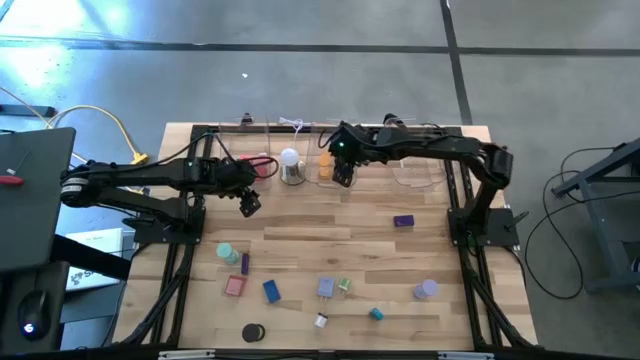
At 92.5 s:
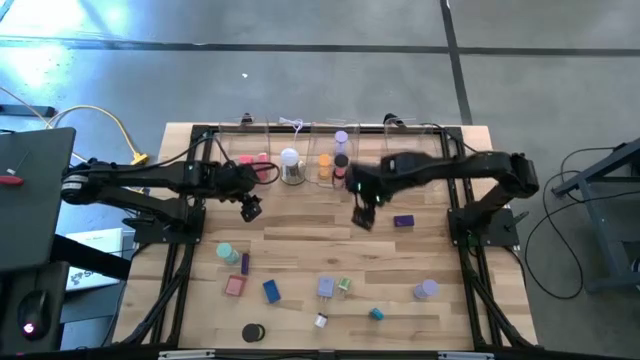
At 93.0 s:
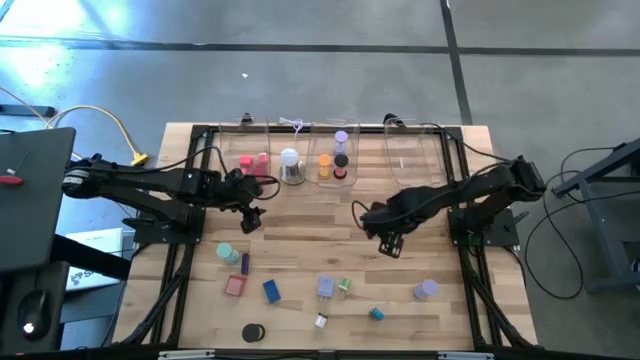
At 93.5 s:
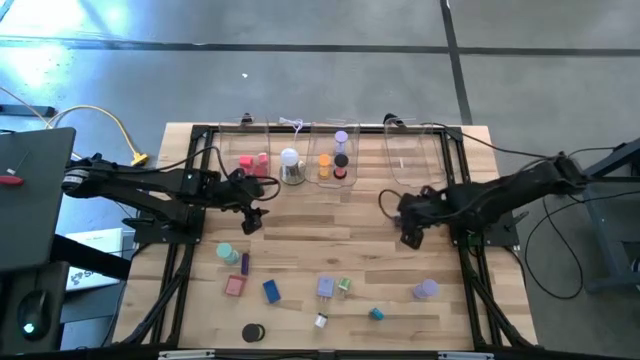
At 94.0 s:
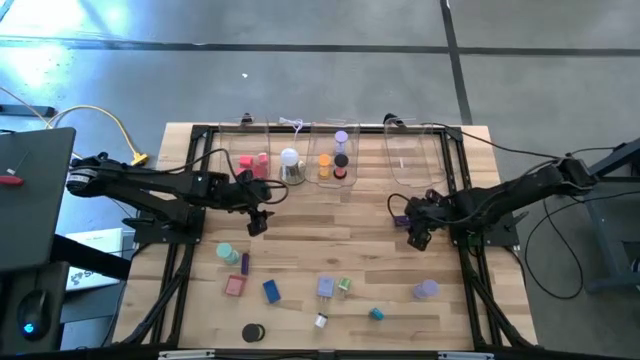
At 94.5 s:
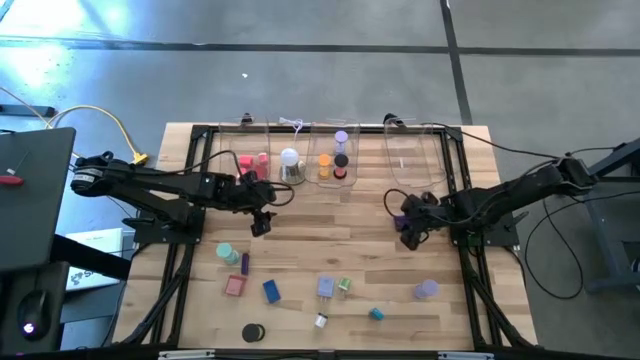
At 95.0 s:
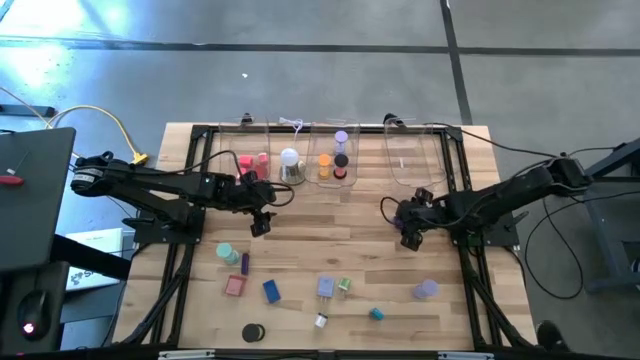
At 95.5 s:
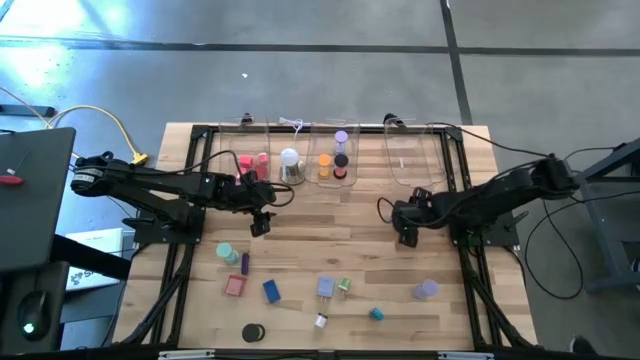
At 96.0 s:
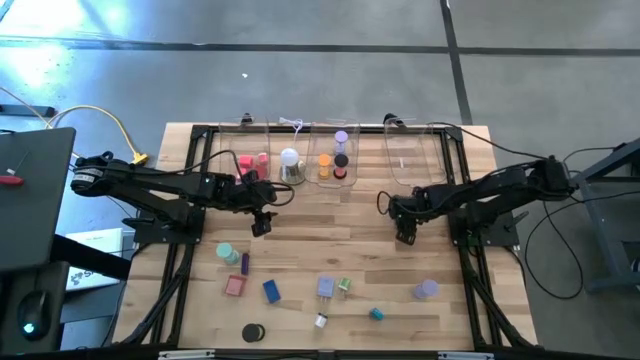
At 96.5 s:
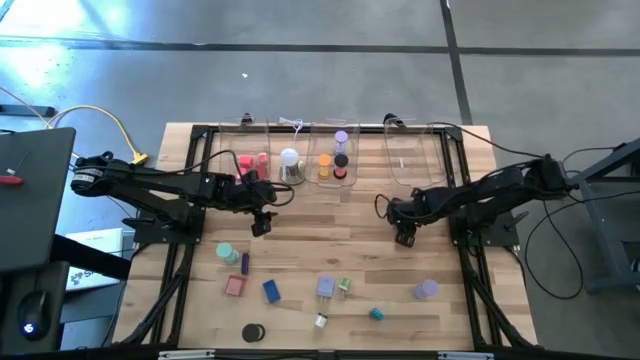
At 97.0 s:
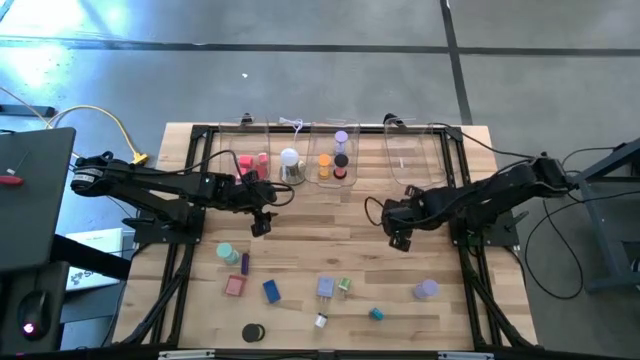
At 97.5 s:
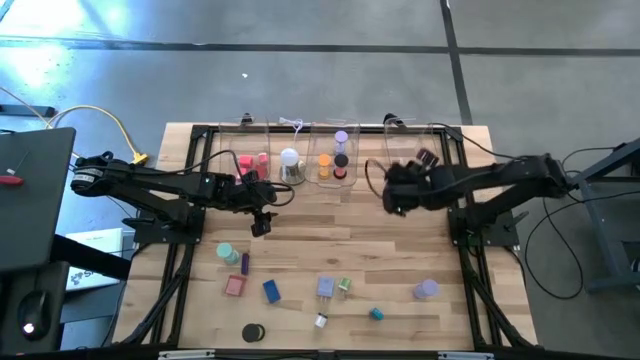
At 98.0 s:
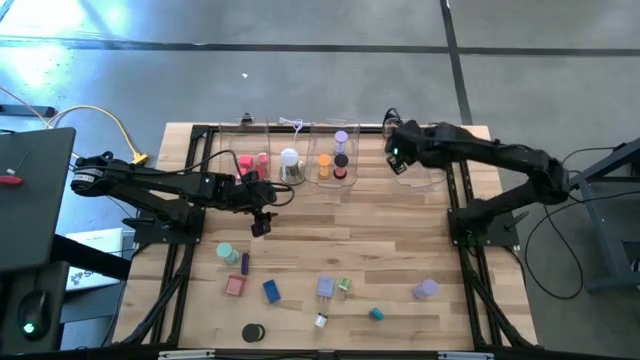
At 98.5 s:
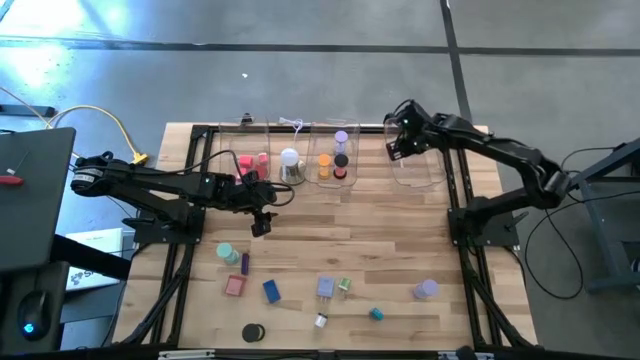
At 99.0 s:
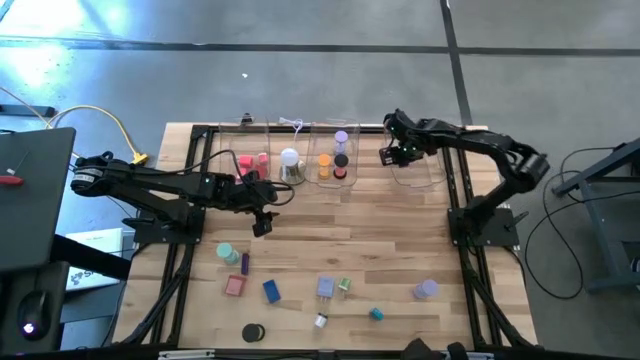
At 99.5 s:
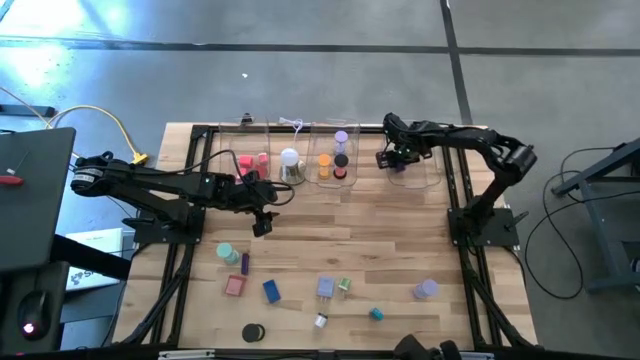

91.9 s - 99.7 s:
Task: Pick & Place Office items
Put the right blue digital clock into the right transparent bin

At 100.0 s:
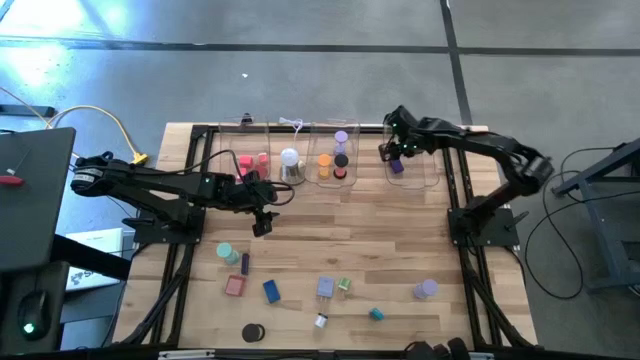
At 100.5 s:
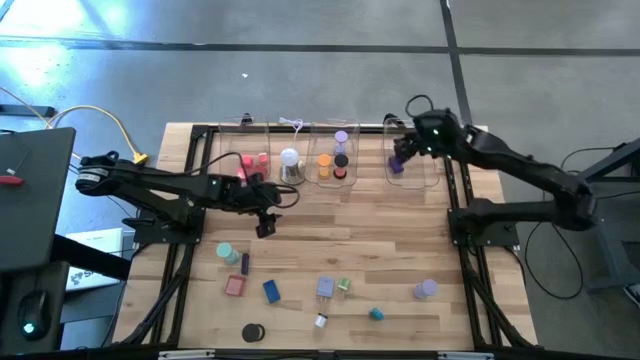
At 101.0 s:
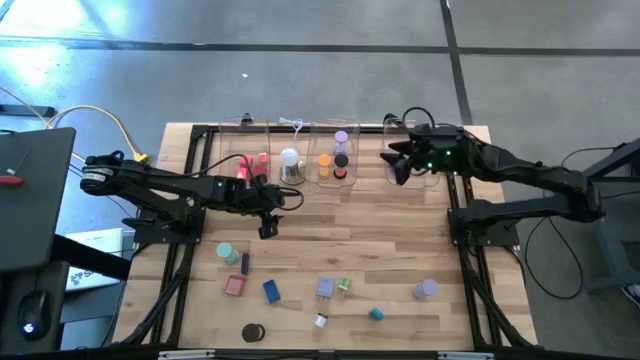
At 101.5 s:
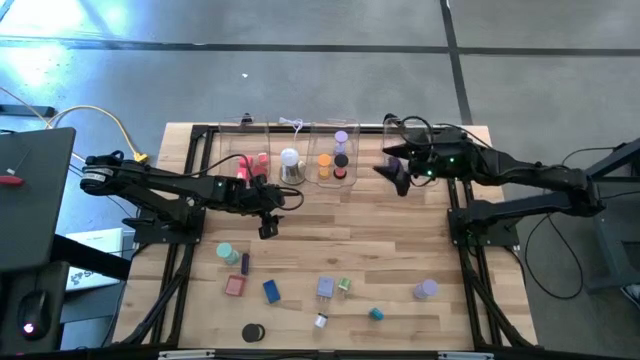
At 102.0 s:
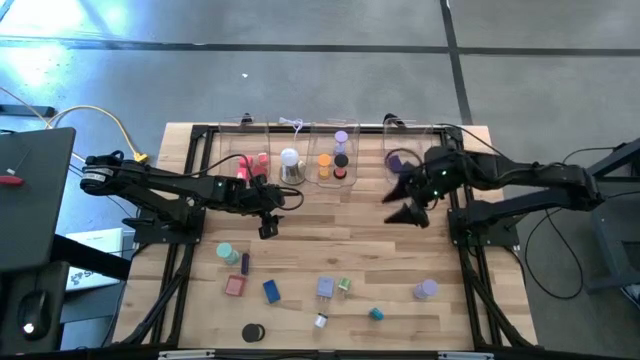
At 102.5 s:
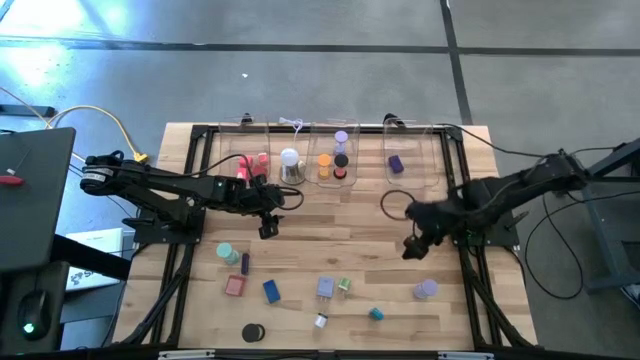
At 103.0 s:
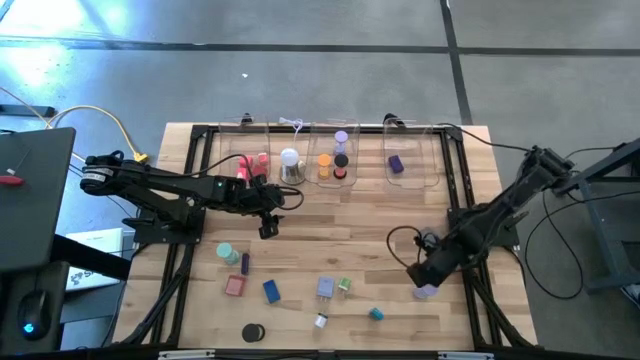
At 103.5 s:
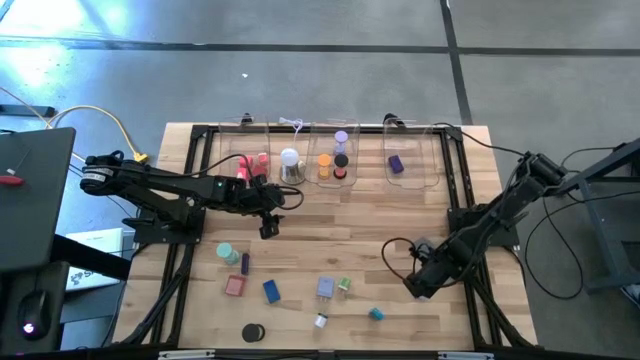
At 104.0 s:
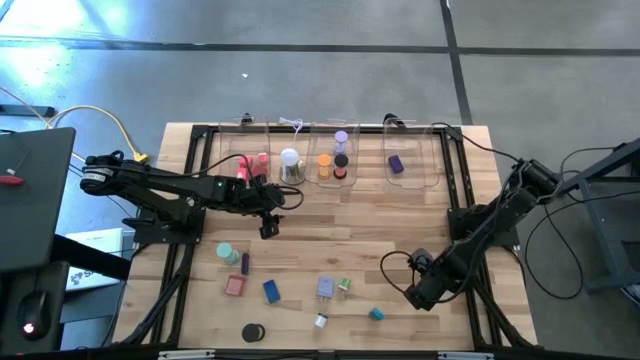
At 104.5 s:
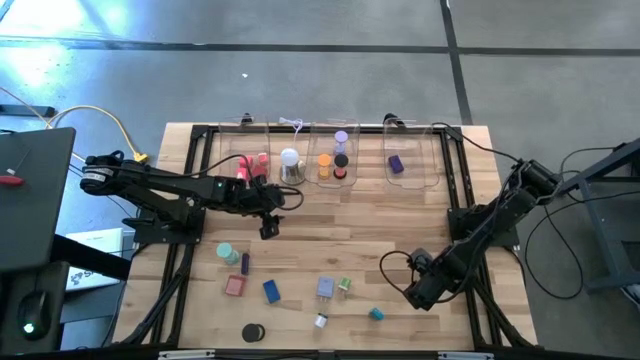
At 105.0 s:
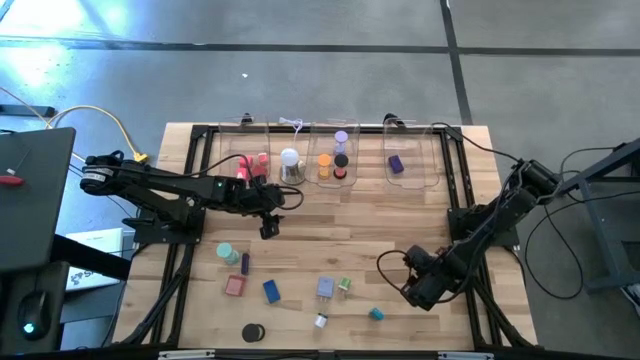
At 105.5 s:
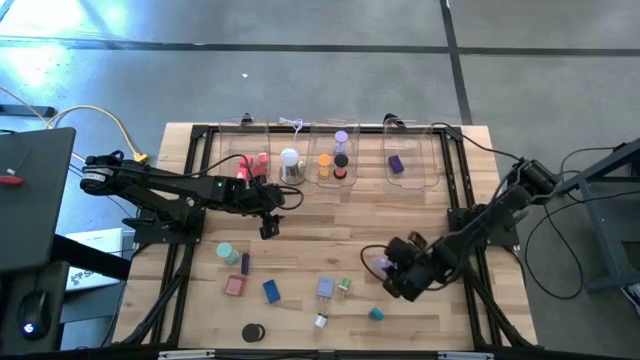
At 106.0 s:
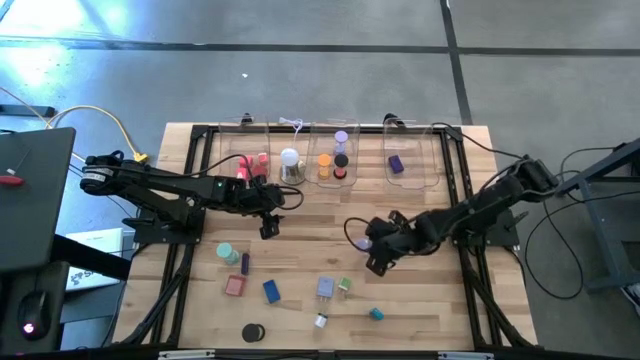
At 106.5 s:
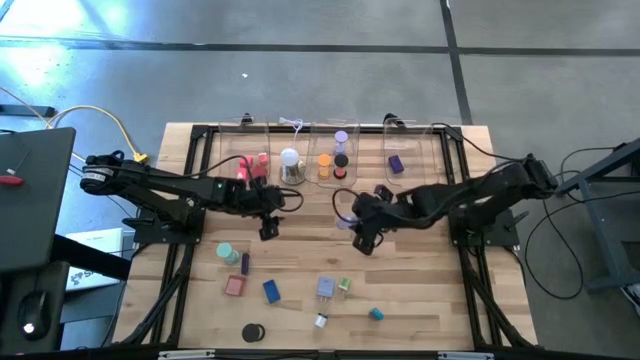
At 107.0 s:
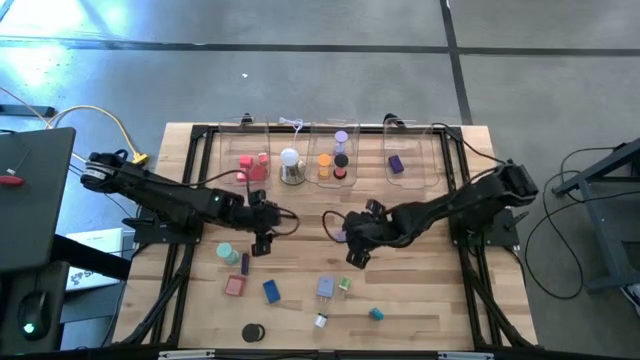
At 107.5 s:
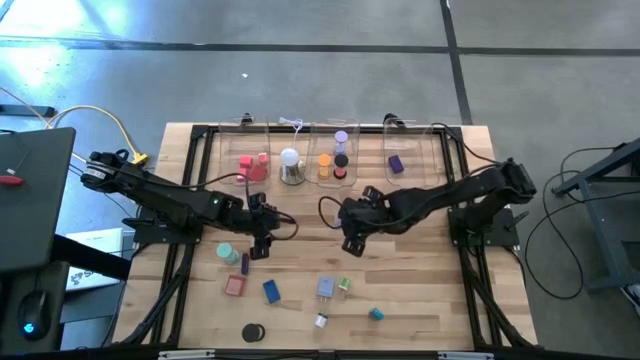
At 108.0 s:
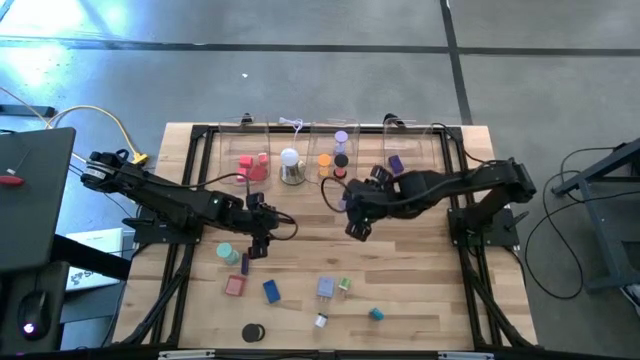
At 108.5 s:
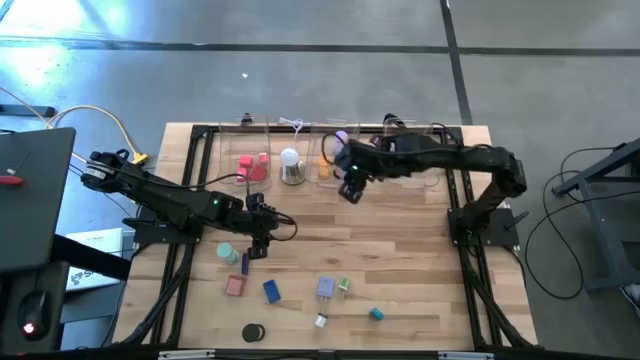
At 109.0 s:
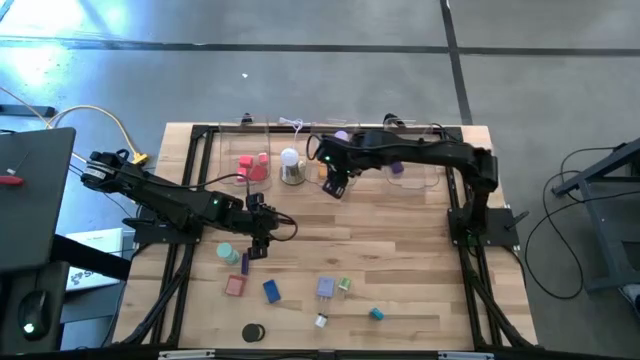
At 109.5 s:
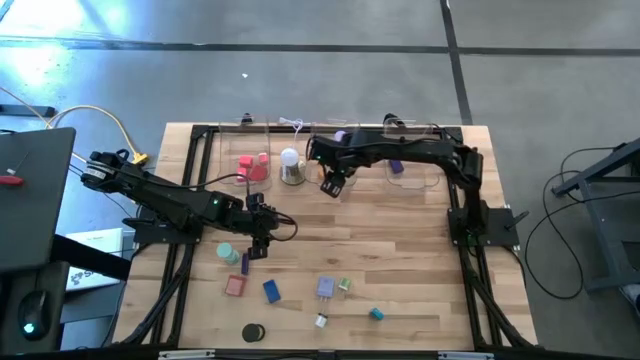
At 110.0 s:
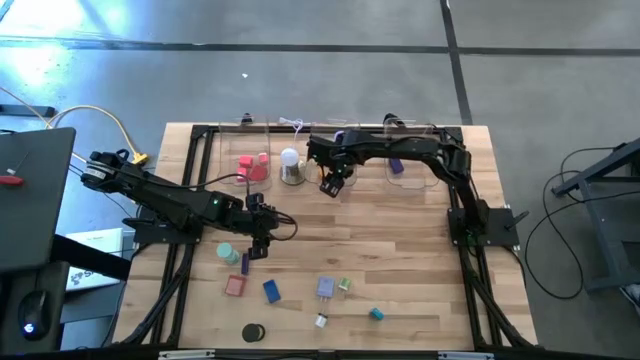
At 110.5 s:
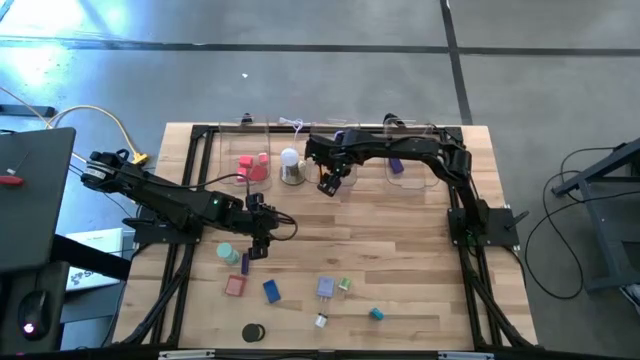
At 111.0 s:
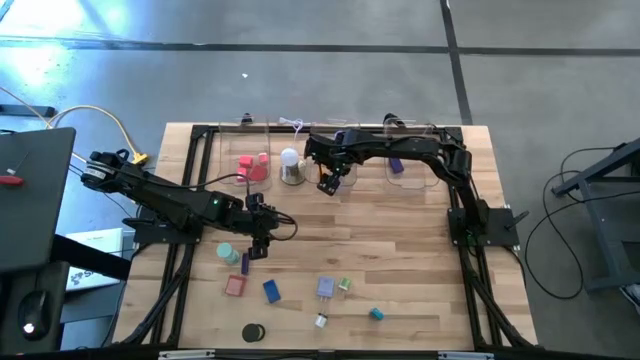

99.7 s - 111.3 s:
Put the violet hourglass into the middle transparent bin

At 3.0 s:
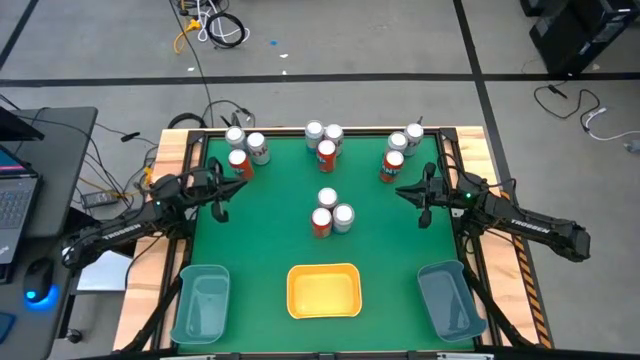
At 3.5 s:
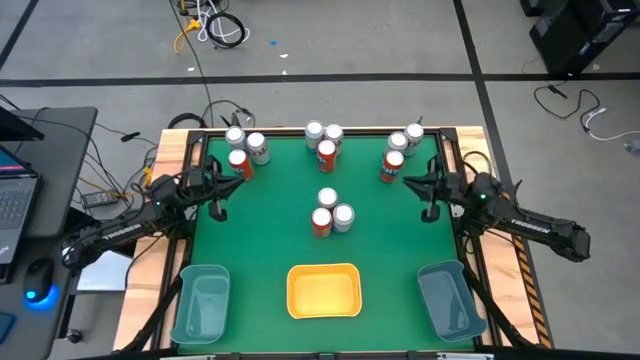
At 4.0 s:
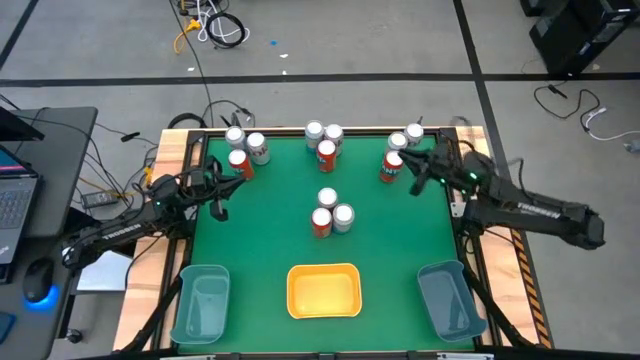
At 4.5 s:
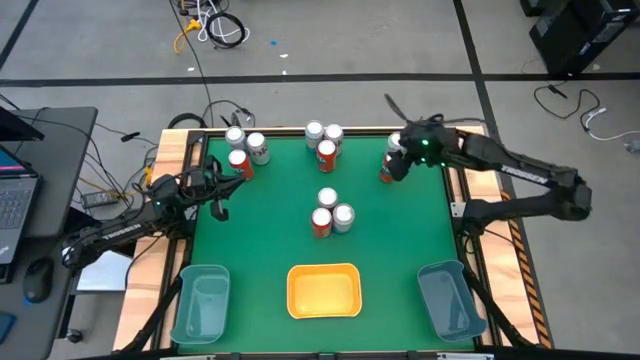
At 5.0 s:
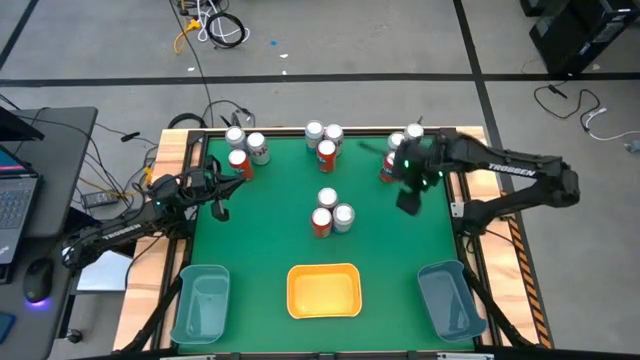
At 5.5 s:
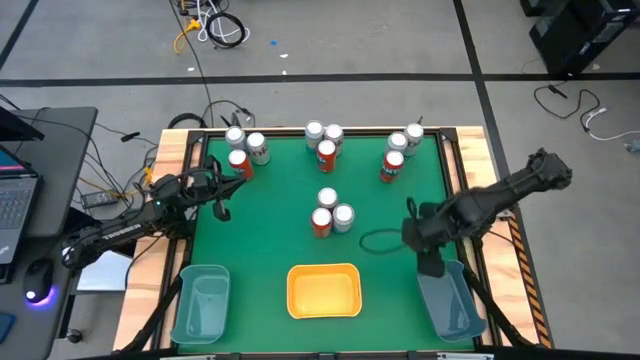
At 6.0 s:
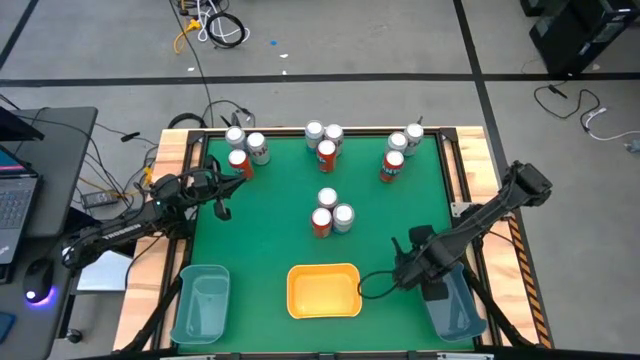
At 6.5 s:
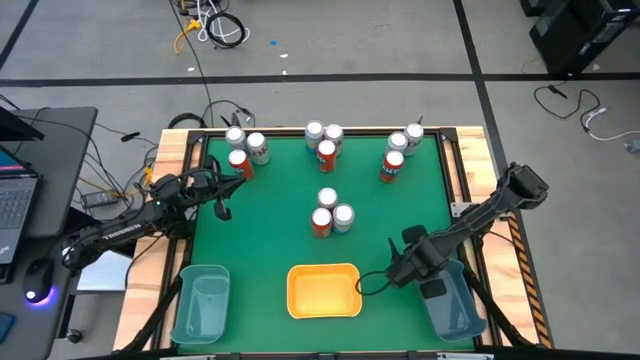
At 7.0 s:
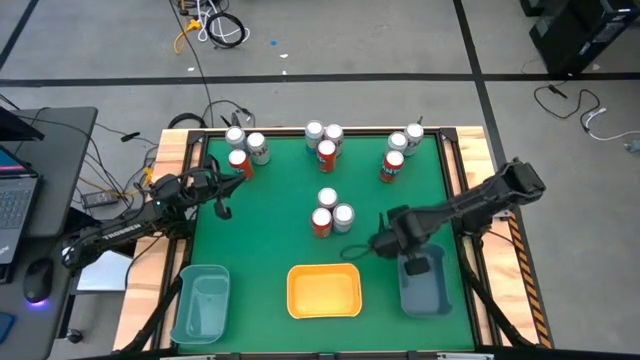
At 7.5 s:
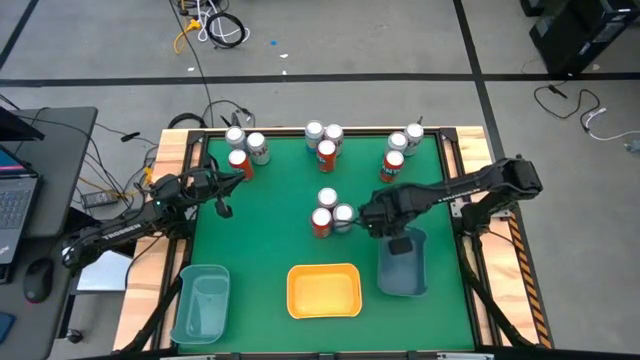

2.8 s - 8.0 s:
Task: Sort soda cans
Adjust the blue bin on the table
